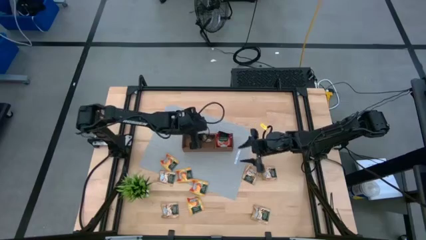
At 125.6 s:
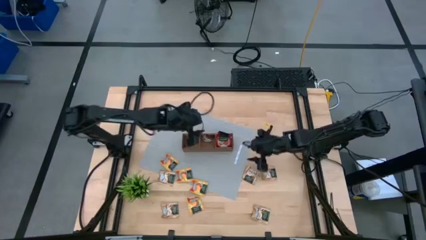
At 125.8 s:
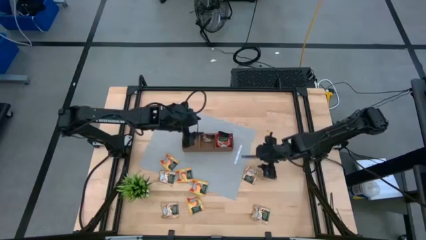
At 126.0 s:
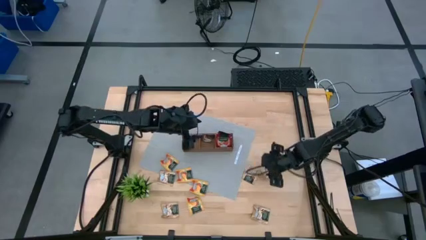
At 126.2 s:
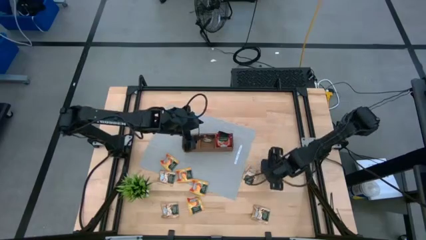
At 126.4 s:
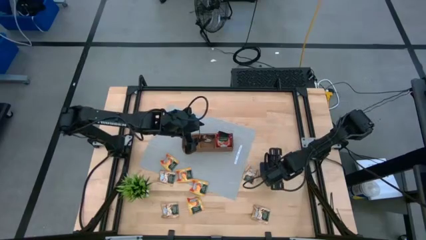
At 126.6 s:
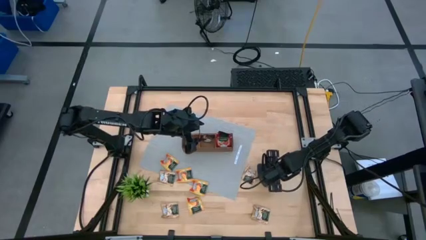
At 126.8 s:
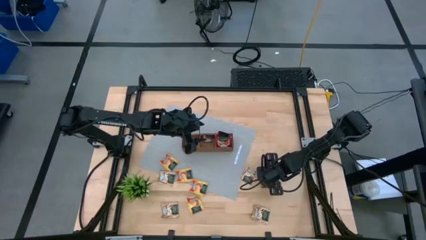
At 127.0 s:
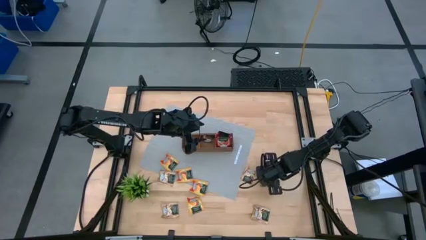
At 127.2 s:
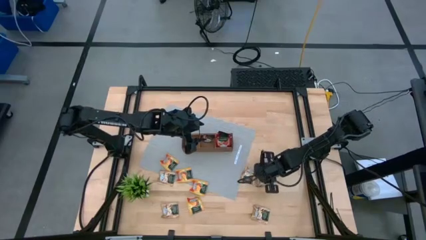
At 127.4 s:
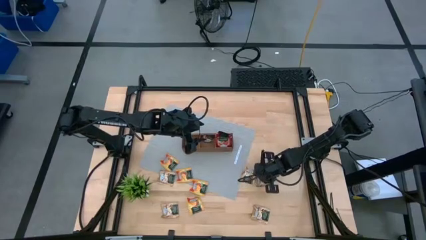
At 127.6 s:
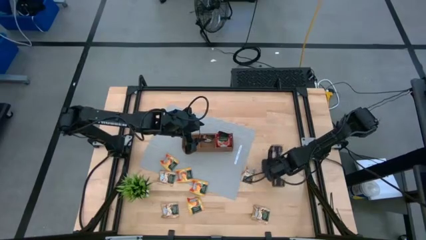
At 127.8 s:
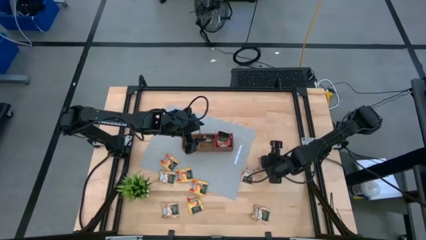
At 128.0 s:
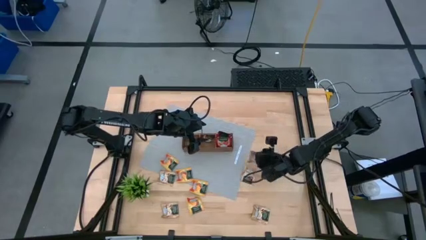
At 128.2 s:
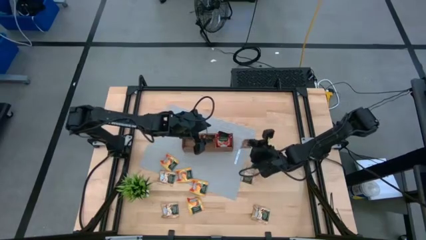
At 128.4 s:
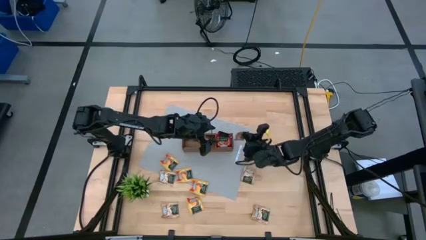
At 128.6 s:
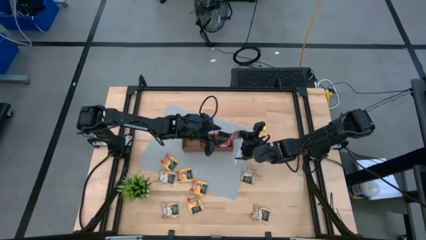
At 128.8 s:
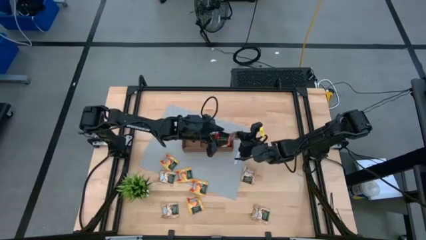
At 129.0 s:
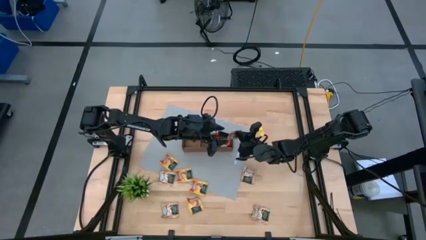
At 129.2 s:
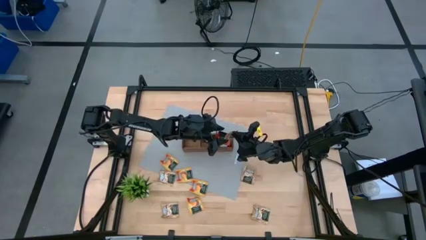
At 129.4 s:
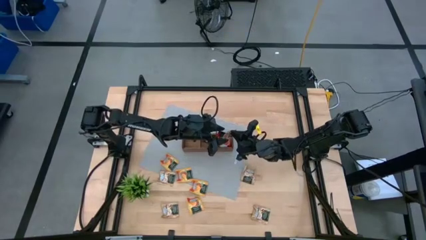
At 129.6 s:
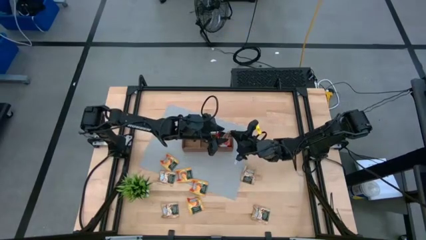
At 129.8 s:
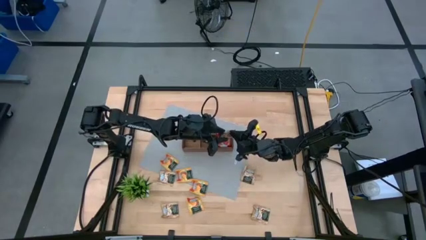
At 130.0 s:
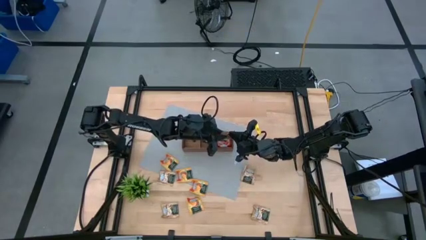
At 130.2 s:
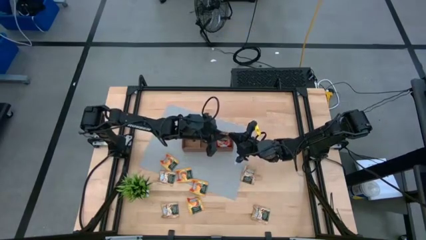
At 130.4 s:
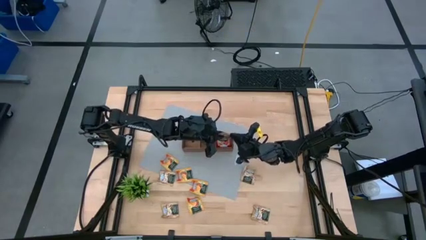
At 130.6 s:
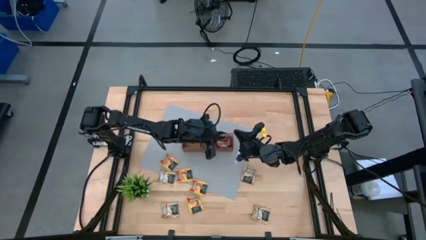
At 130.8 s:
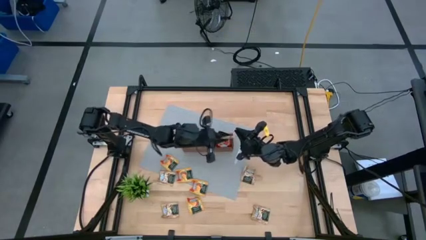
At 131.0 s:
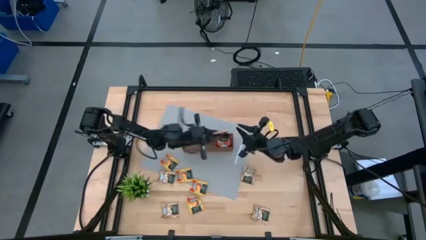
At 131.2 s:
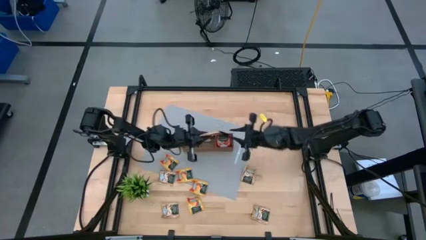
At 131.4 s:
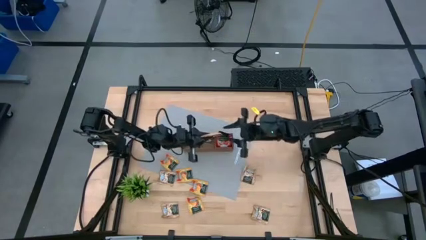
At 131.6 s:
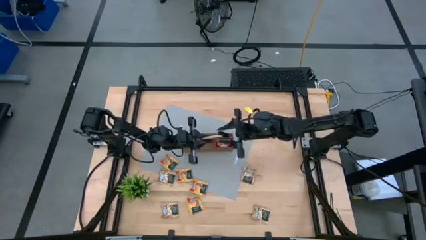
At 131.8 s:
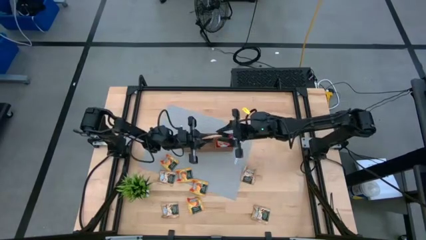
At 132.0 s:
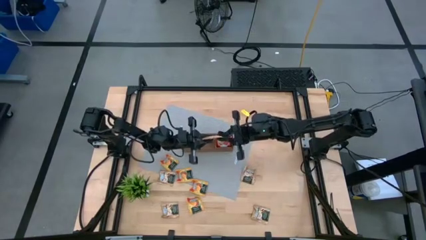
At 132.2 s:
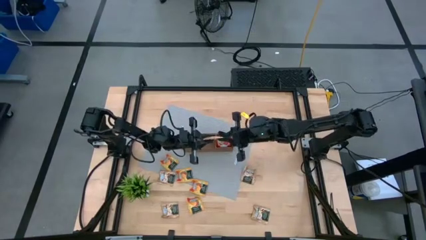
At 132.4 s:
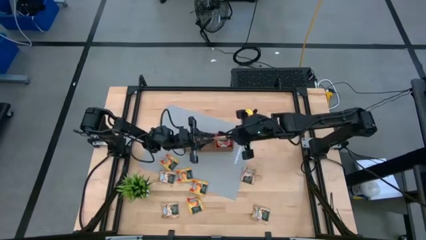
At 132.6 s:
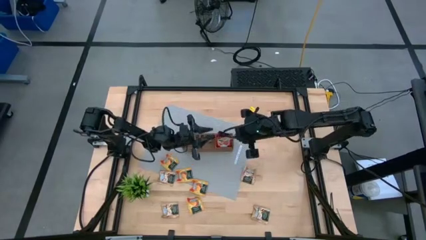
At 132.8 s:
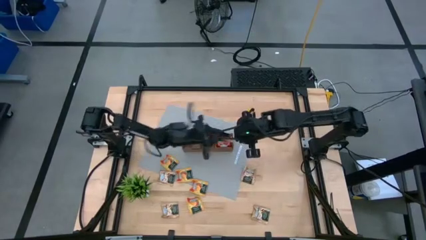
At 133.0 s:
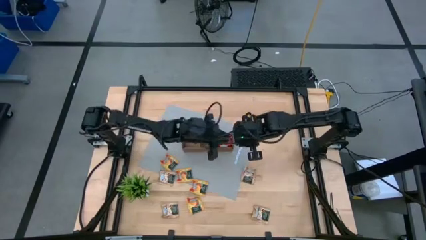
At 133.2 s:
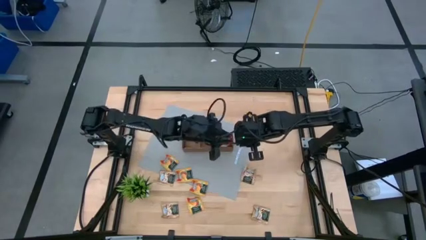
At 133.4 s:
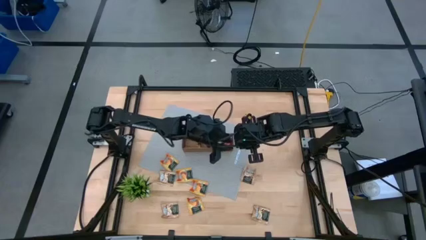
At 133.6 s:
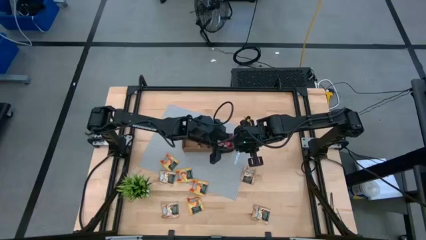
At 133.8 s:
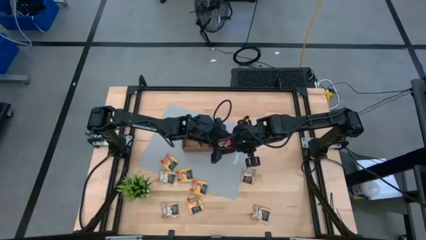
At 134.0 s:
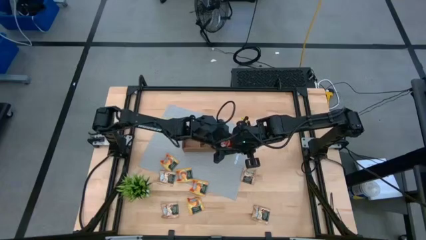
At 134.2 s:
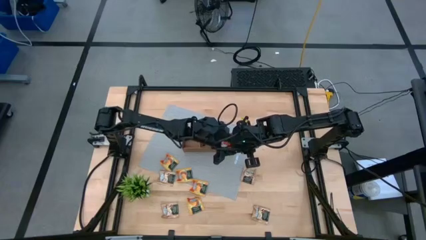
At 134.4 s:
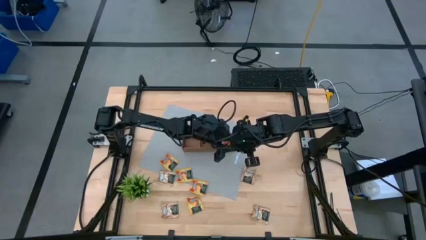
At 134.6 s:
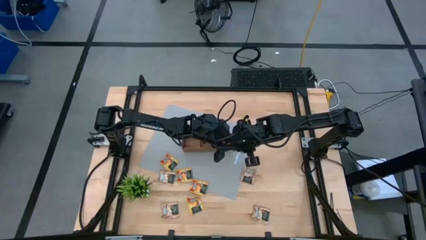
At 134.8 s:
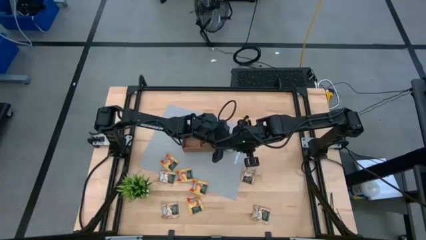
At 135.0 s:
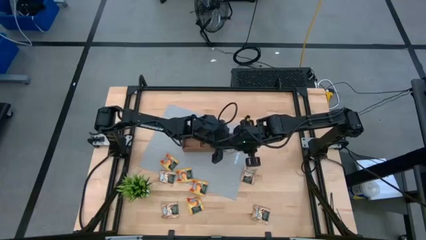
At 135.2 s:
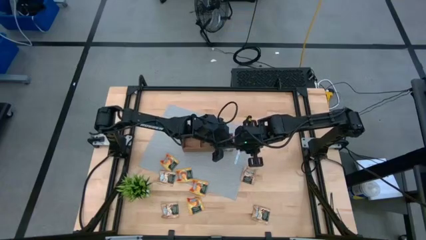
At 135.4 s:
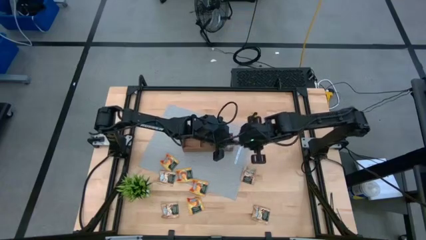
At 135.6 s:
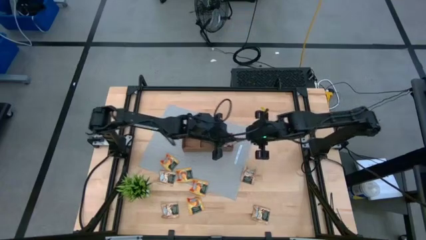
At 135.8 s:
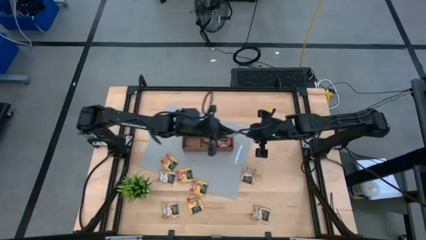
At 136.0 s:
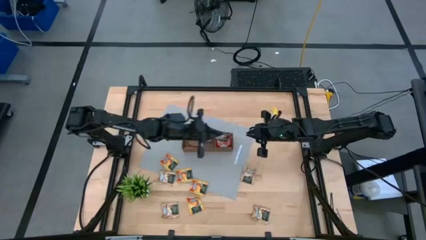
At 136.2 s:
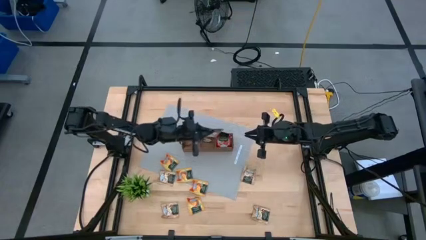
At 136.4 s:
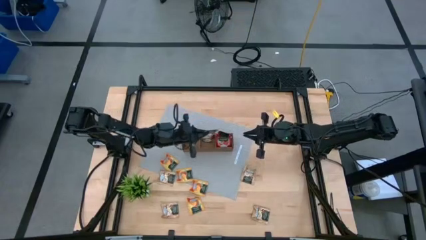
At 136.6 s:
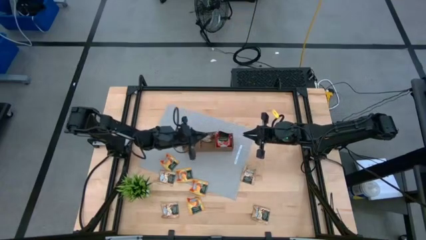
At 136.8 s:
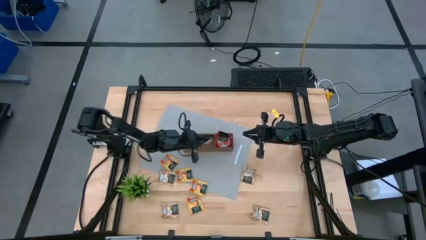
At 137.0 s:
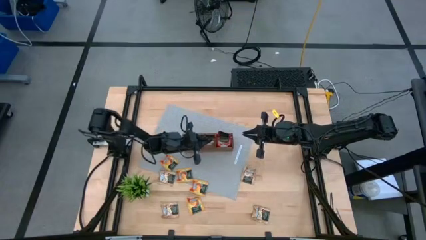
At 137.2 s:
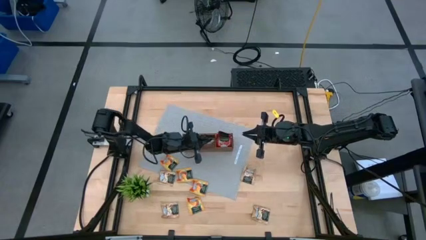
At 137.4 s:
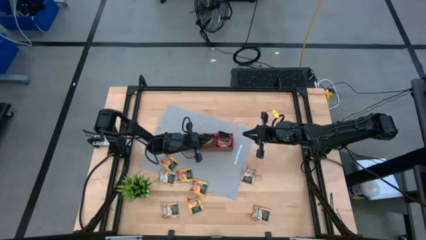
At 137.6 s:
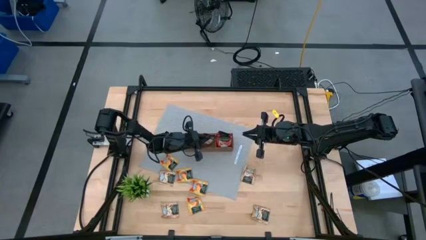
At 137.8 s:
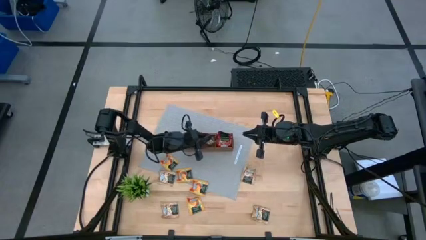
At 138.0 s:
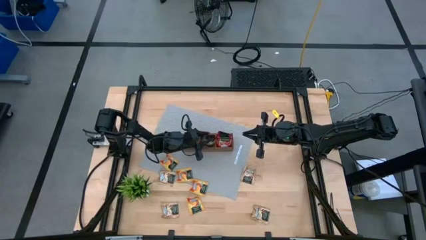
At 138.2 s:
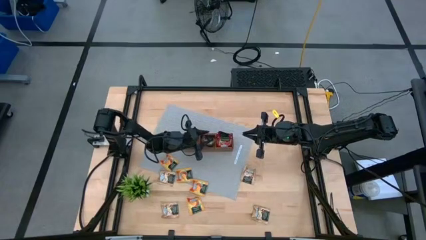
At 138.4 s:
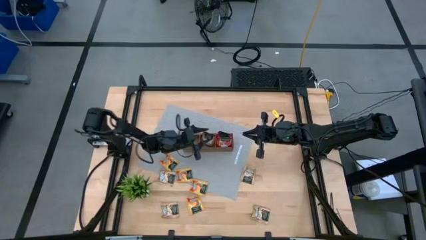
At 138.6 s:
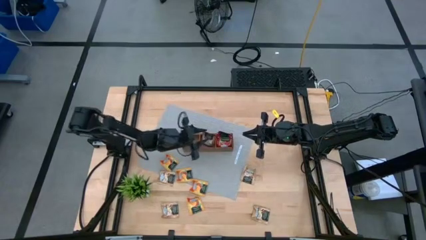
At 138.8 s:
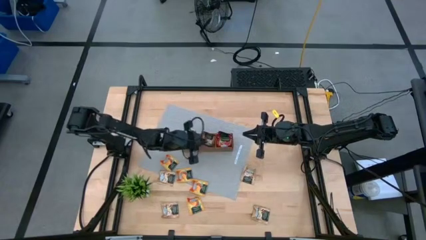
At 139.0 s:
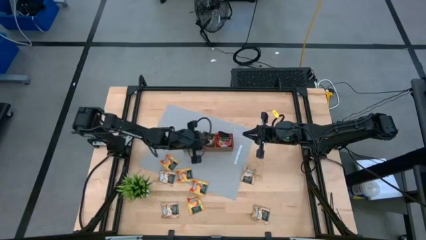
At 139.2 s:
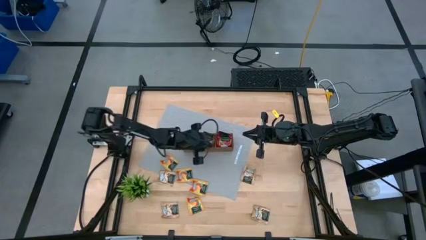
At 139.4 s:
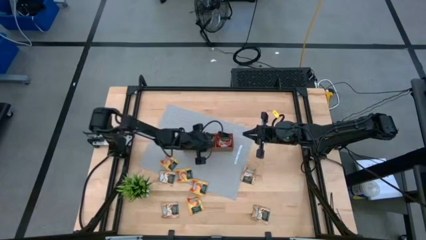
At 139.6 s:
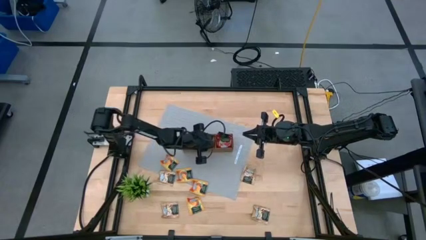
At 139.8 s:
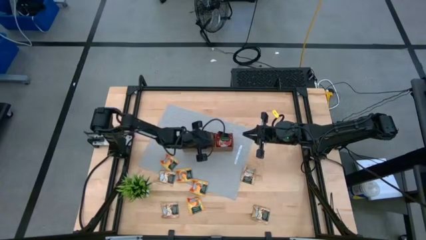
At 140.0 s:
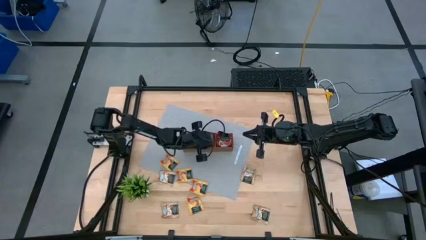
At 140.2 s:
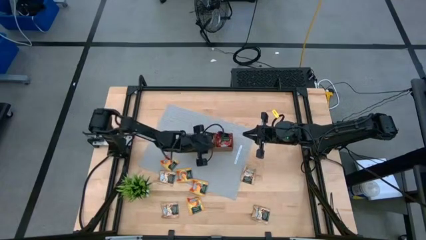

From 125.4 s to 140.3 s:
Task: Pick & Place Tea
Put the brown tea bag into the wooden organizer
